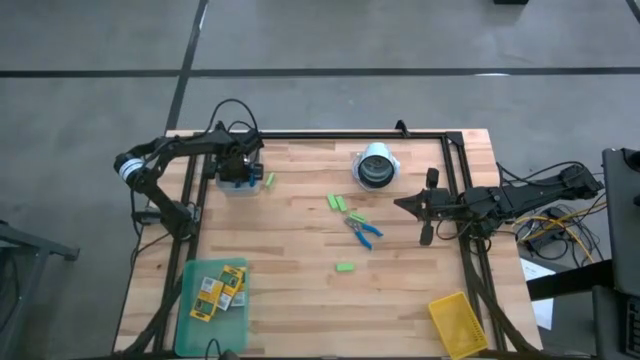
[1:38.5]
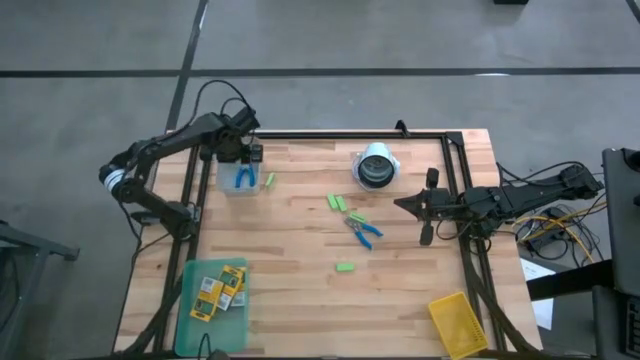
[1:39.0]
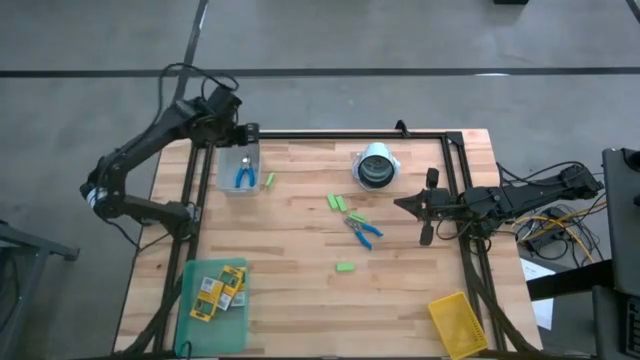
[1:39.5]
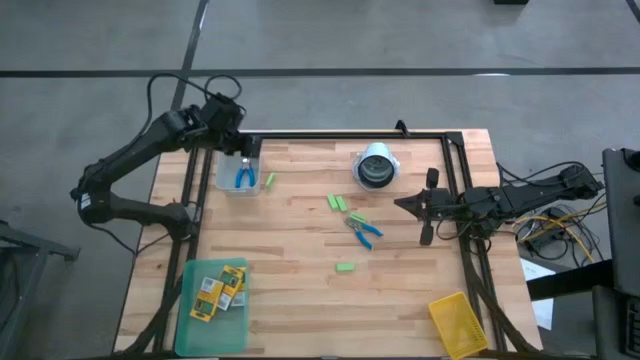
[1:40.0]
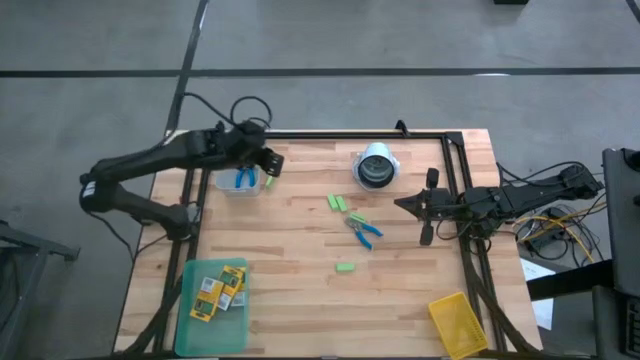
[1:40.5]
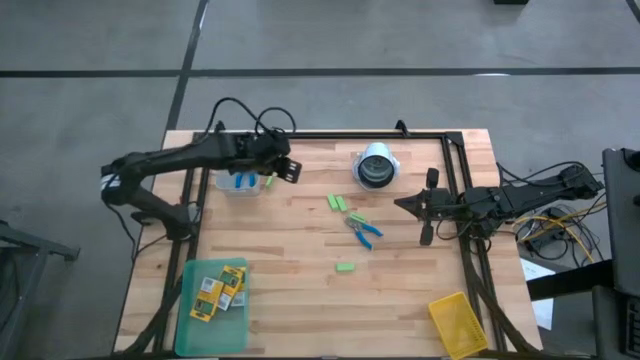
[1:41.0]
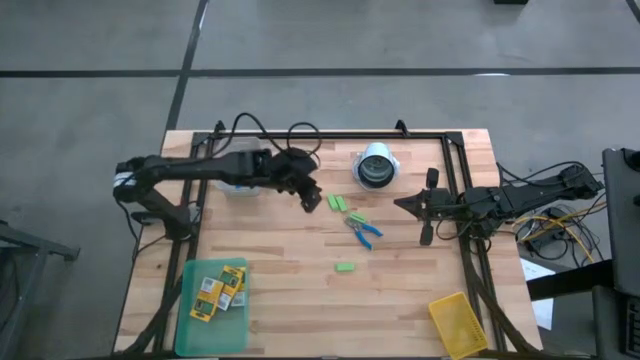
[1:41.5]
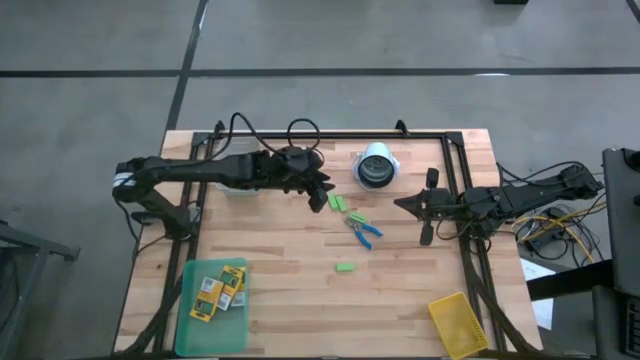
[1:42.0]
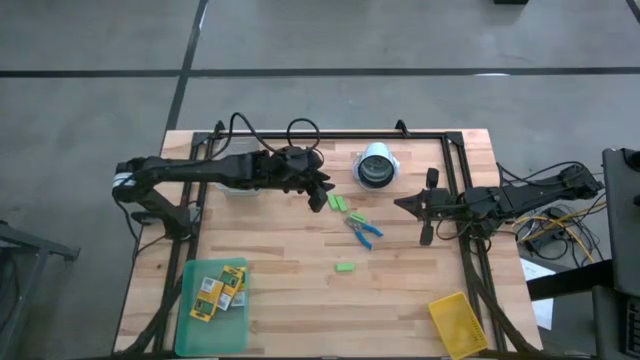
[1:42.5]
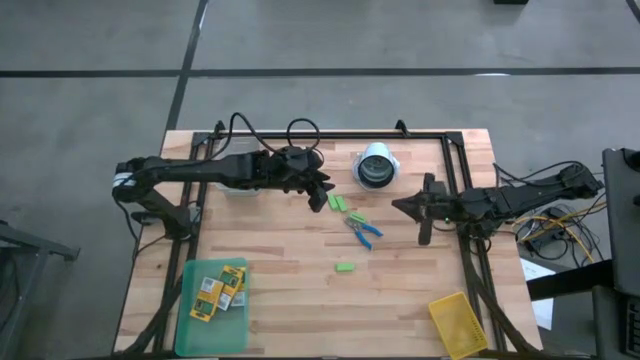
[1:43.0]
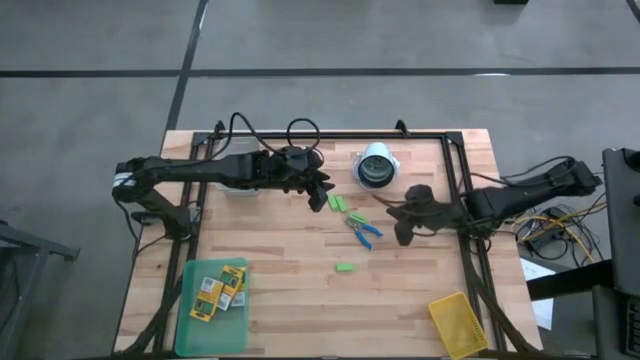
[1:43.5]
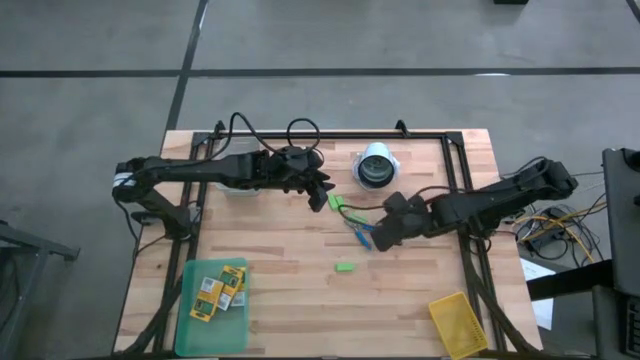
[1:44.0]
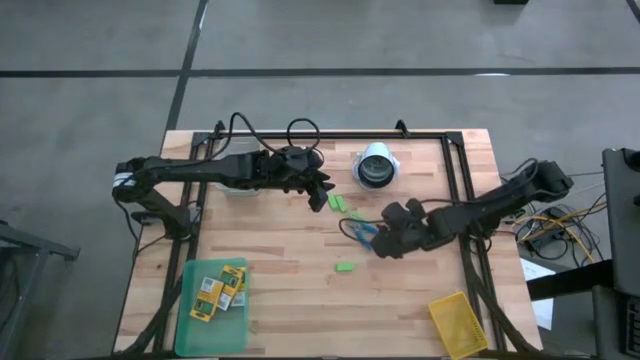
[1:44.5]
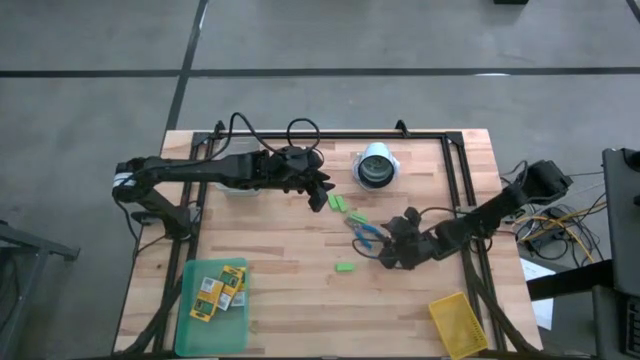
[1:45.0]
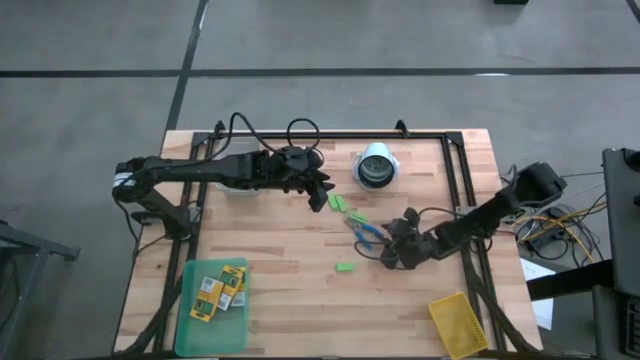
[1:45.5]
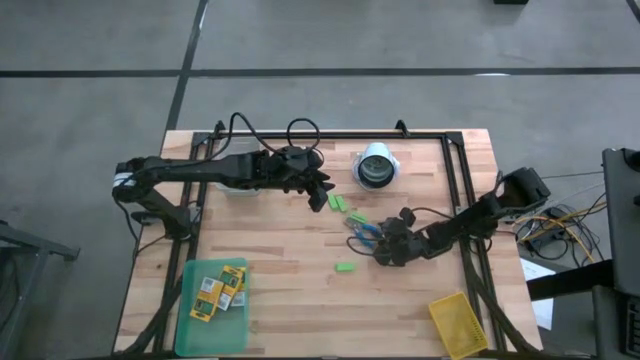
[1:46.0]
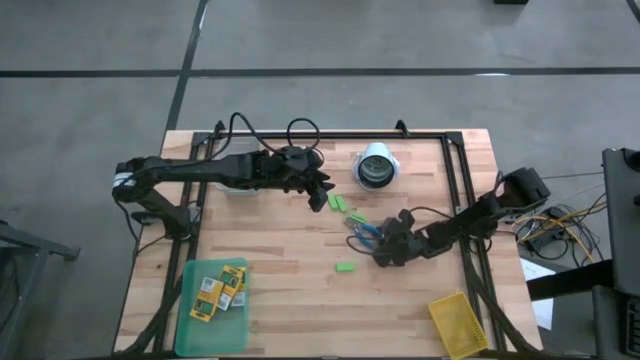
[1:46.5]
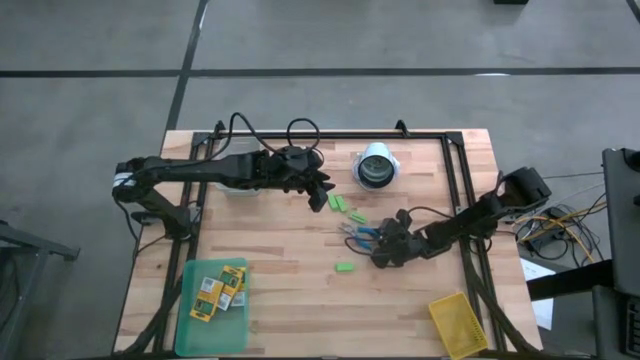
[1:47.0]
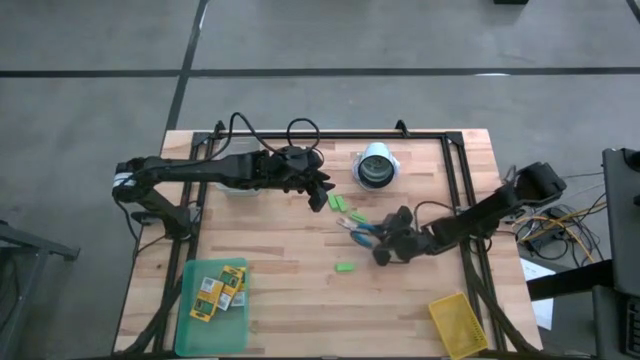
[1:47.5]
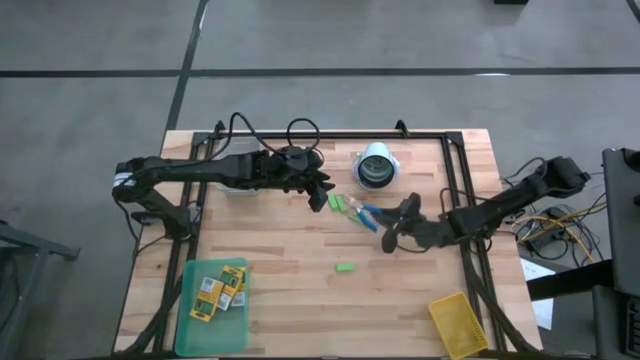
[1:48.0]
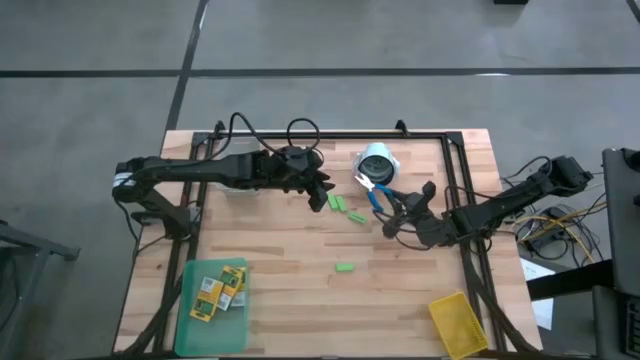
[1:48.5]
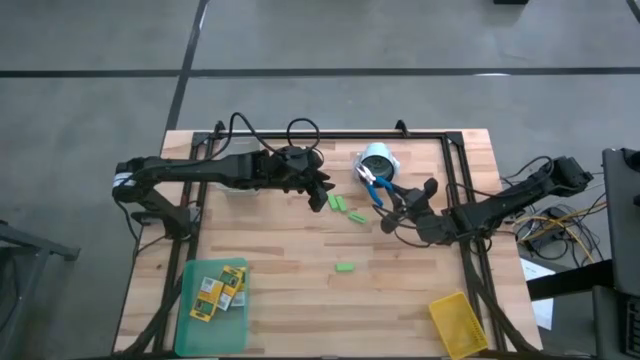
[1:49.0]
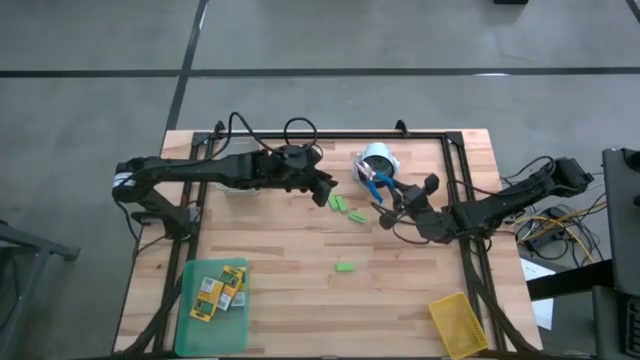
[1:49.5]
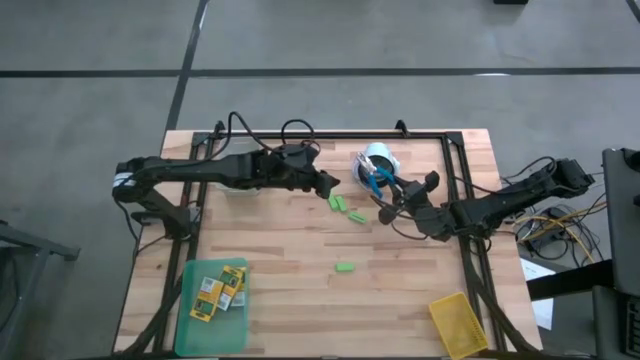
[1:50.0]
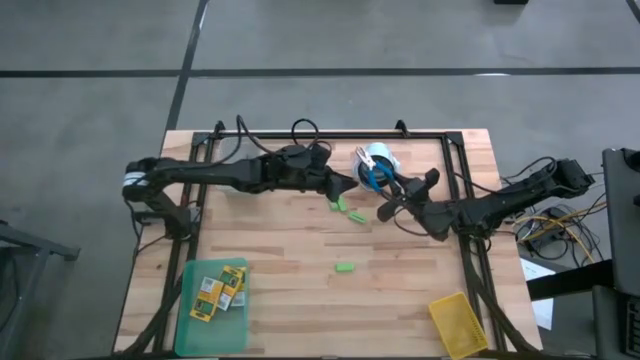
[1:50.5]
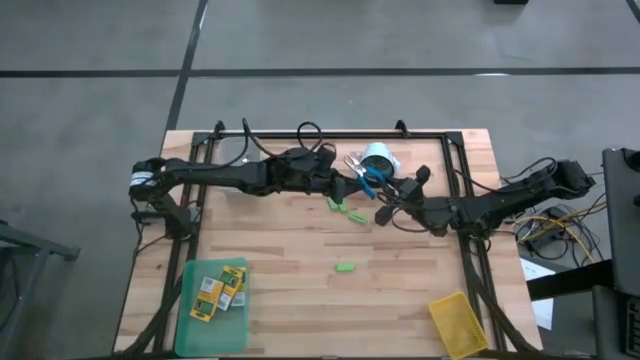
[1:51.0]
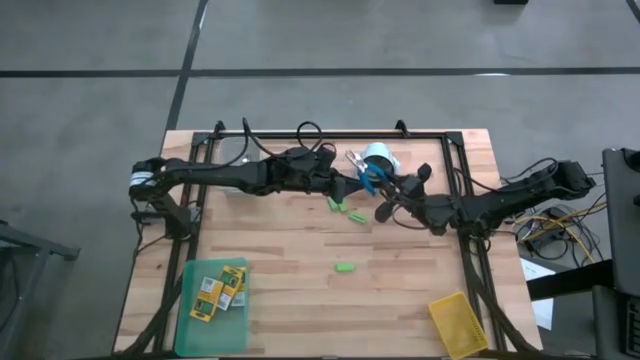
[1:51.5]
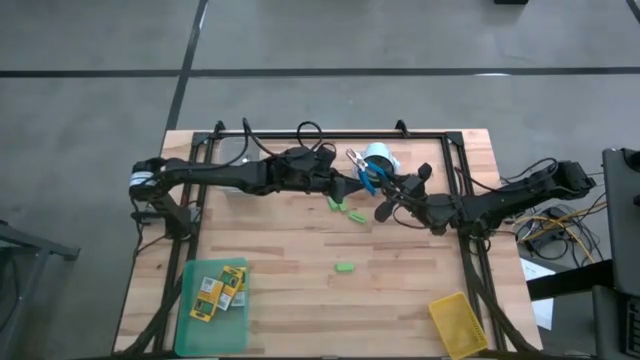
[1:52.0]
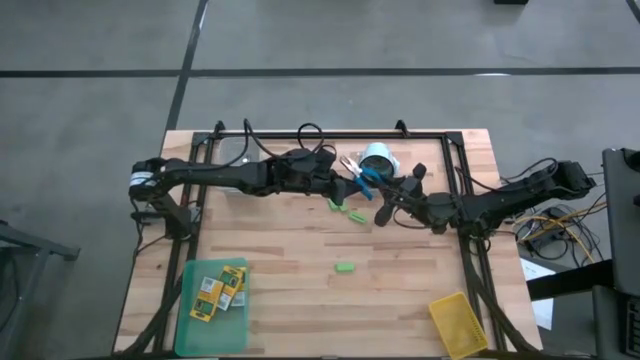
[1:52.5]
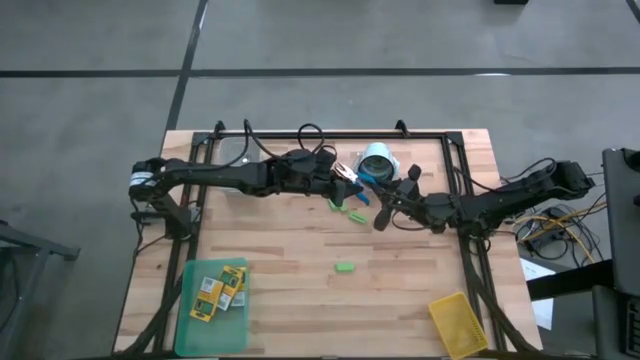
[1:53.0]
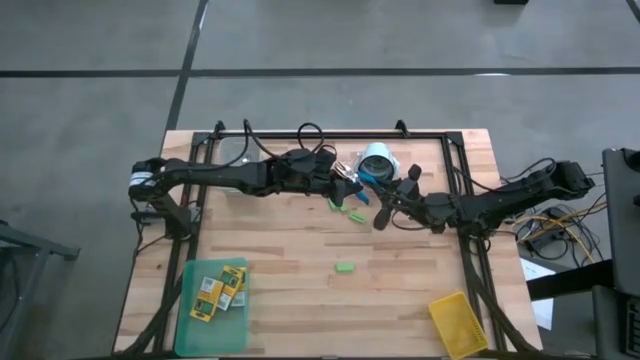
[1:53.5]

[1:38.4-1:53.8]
Task: Pick & Place School Supplies
Put the blue puncher hole into the gray bin

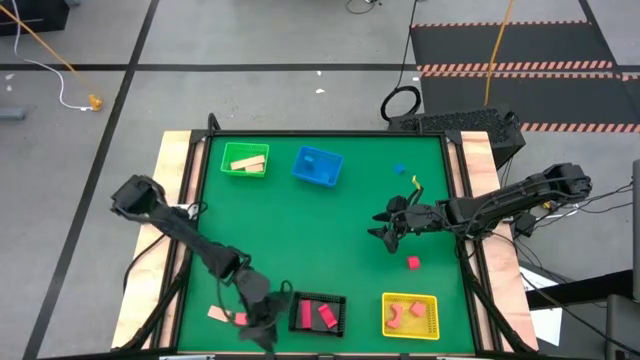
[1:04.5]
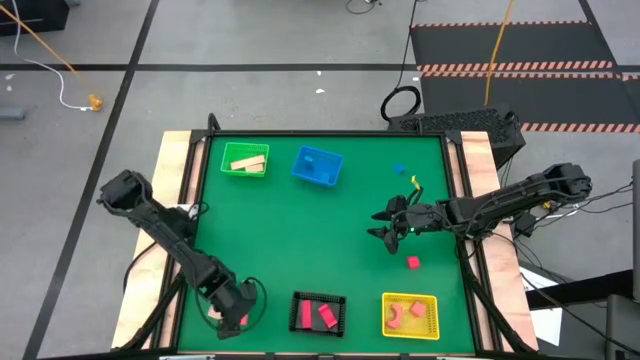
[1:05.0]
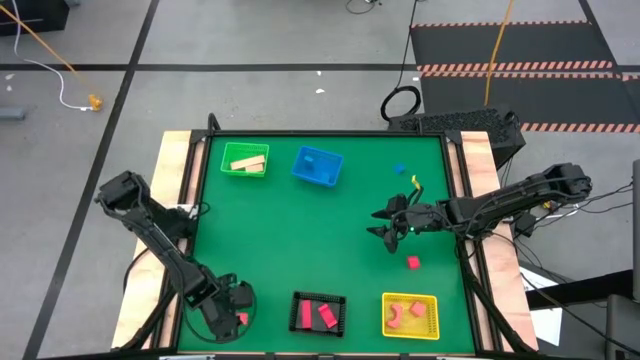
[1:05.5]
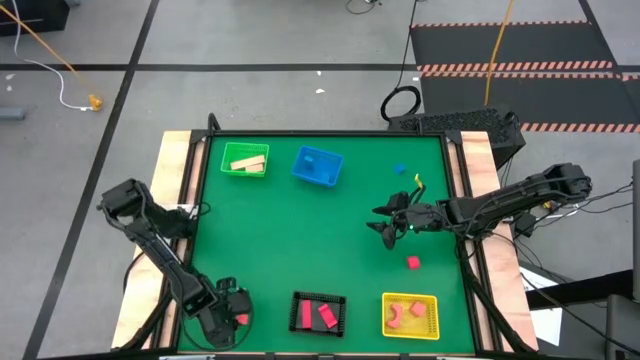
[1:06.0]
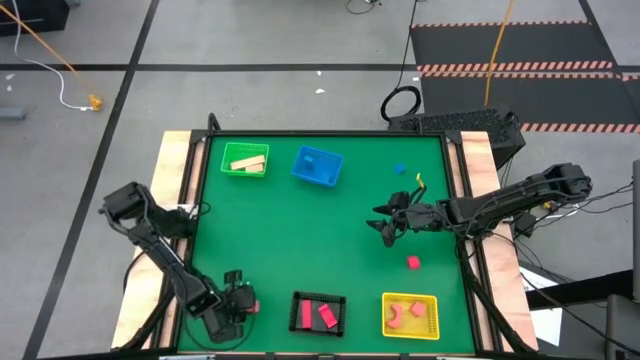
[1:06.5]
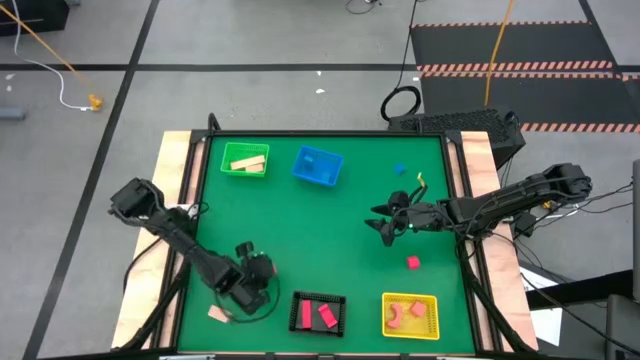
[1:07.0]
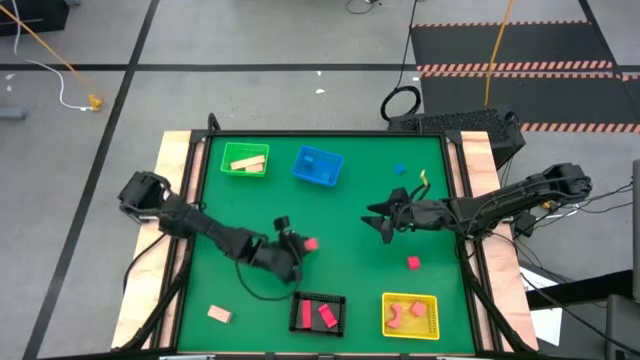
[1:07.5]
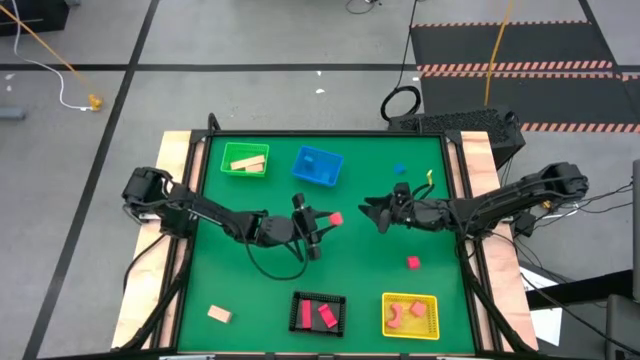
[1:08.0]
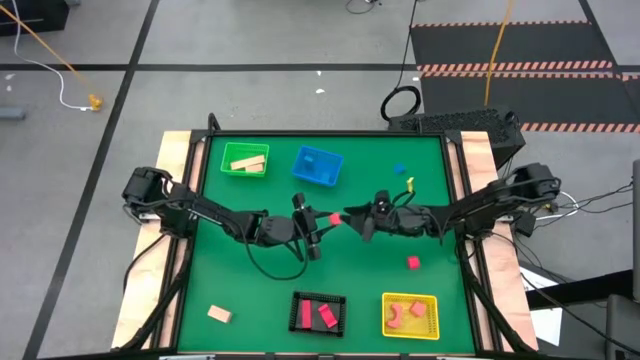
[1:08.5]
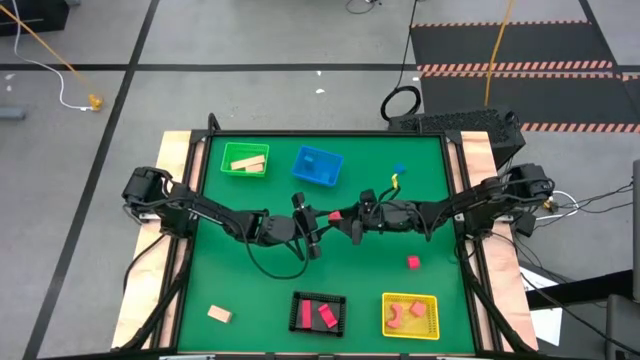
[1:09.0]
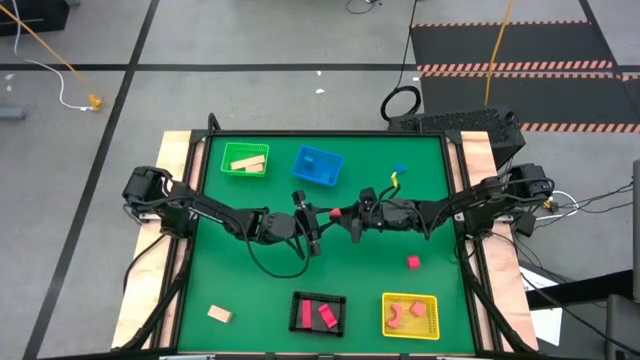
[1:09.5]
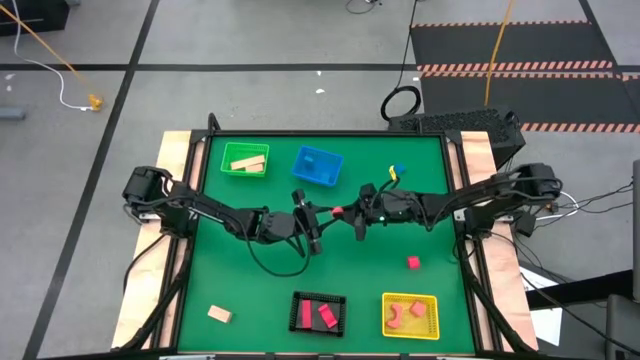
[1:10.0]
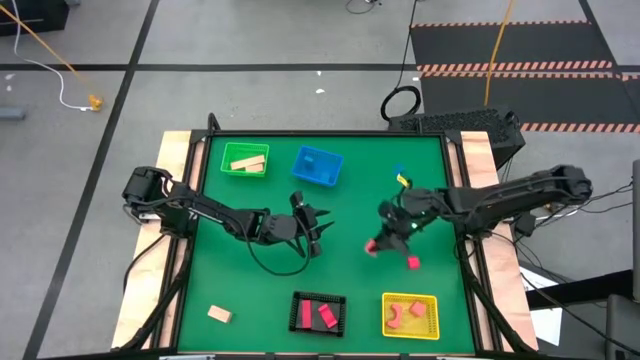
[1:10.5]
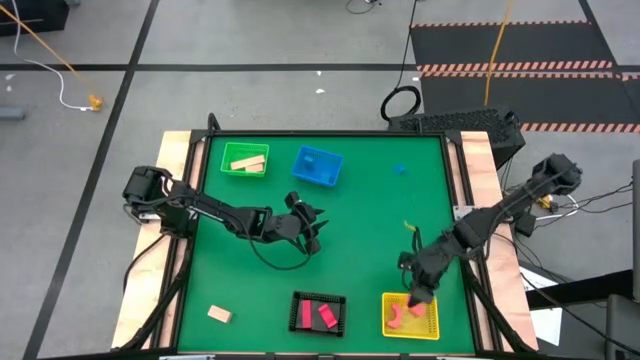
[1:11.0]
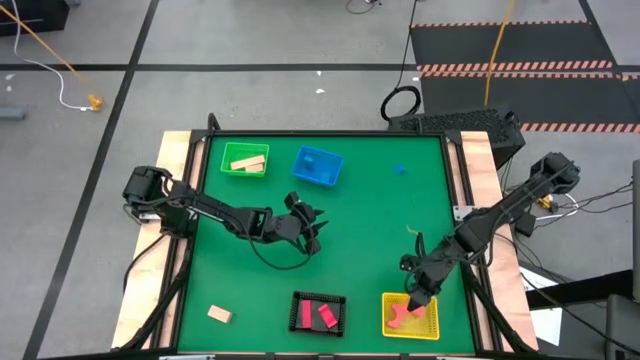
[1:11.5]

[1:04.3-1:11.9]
Task: Sort & place blocks by color
Put the pink wooden block into the yellow basket
